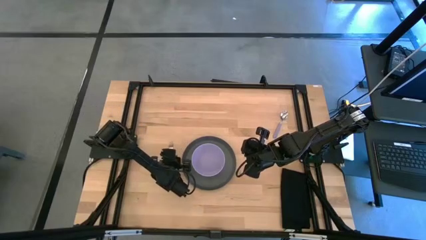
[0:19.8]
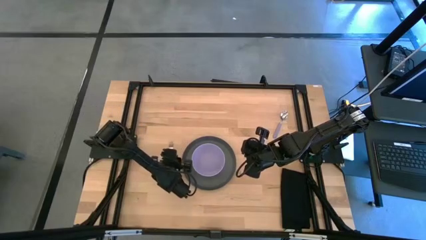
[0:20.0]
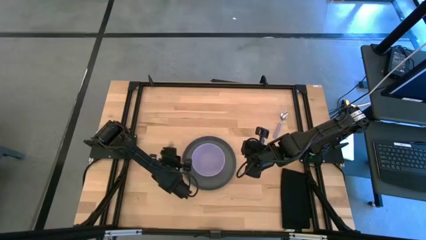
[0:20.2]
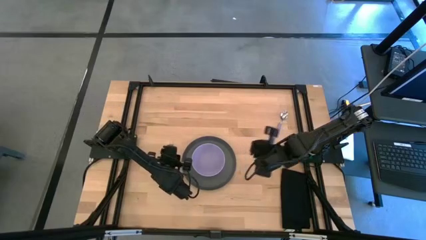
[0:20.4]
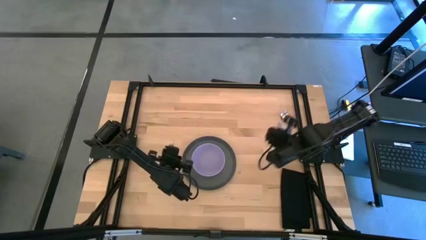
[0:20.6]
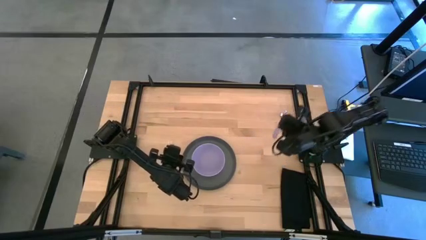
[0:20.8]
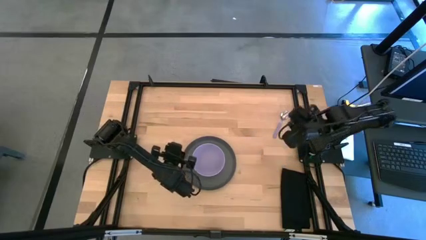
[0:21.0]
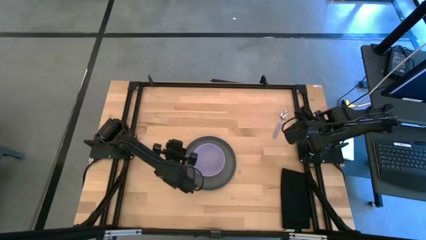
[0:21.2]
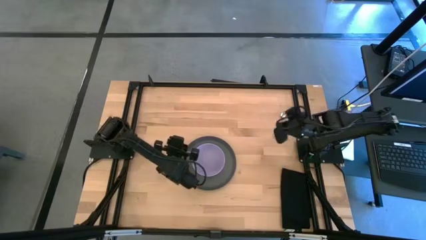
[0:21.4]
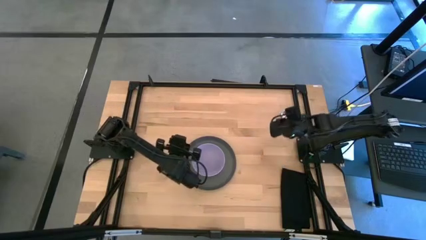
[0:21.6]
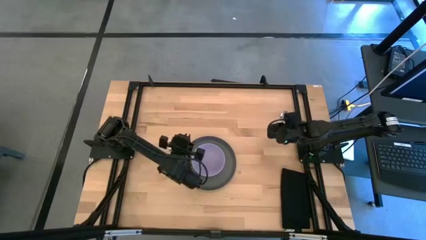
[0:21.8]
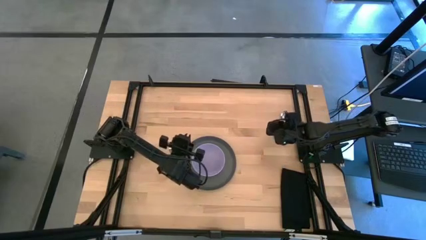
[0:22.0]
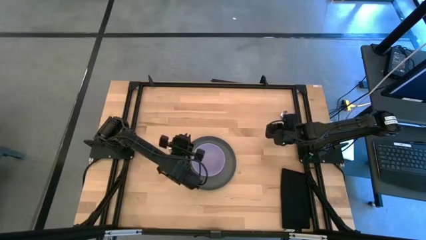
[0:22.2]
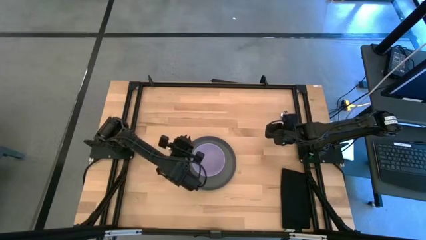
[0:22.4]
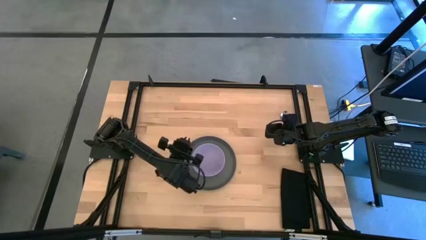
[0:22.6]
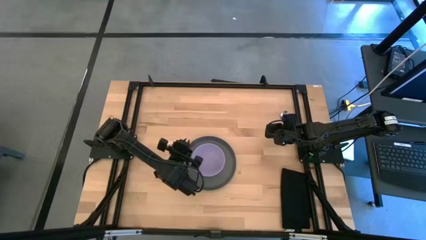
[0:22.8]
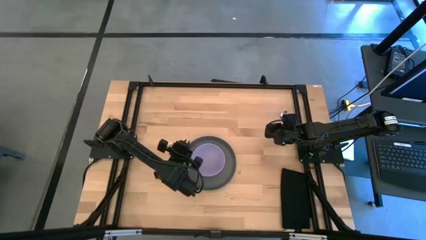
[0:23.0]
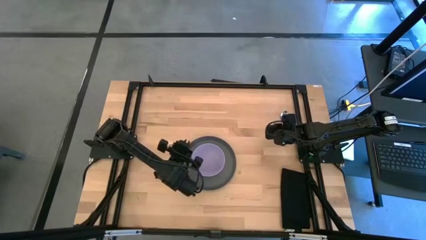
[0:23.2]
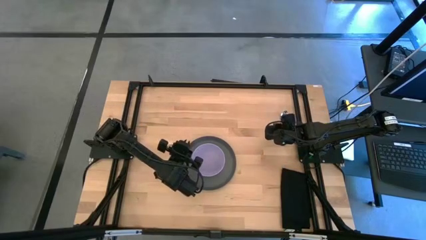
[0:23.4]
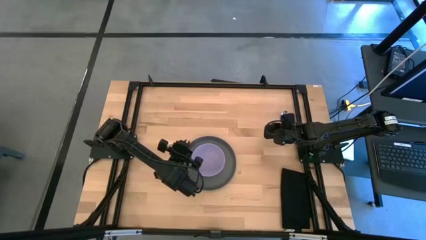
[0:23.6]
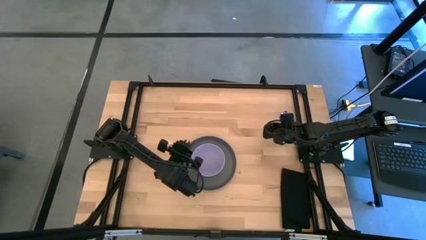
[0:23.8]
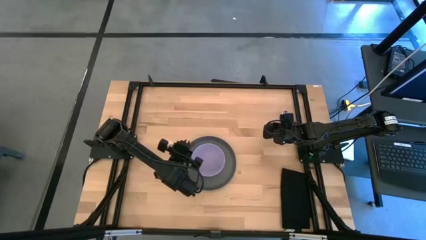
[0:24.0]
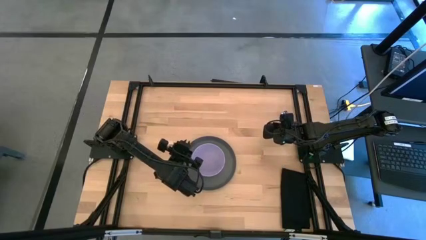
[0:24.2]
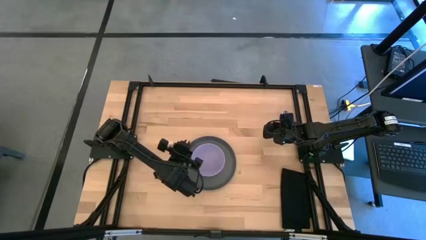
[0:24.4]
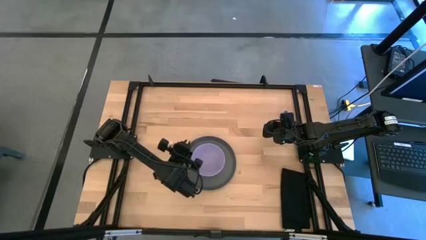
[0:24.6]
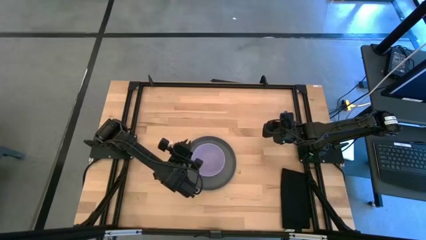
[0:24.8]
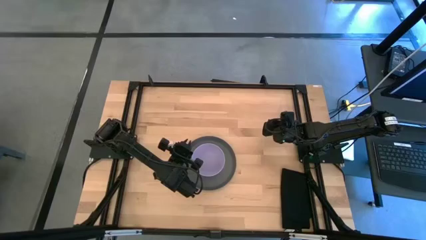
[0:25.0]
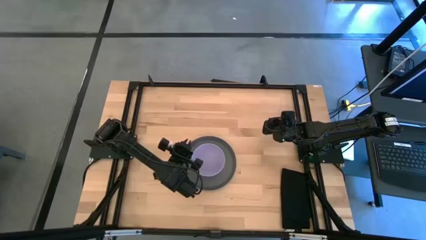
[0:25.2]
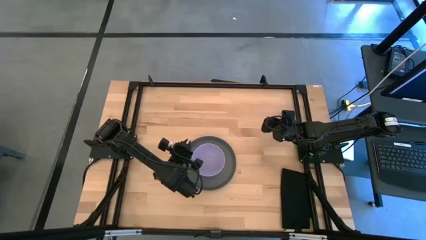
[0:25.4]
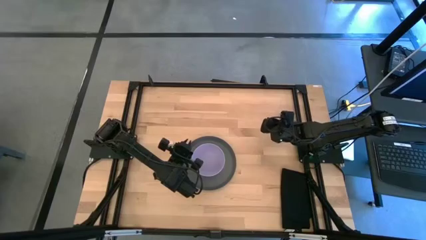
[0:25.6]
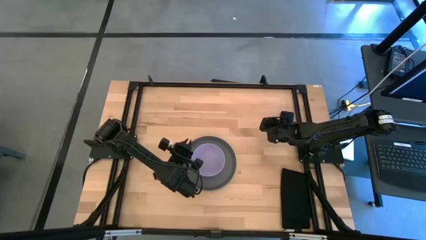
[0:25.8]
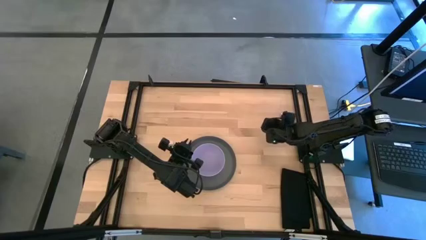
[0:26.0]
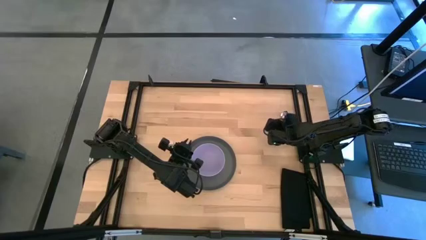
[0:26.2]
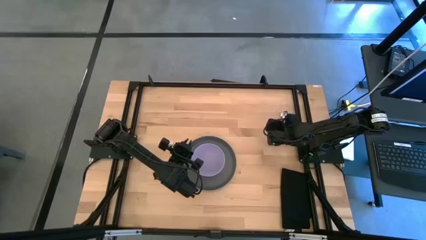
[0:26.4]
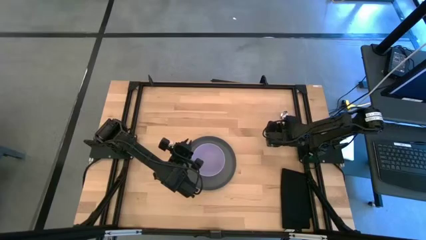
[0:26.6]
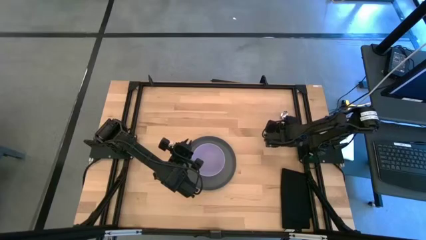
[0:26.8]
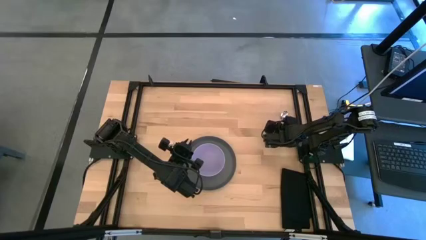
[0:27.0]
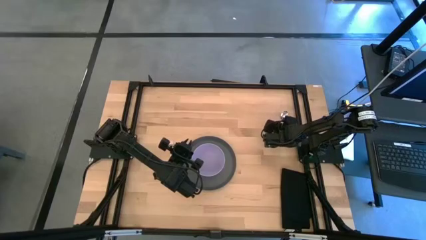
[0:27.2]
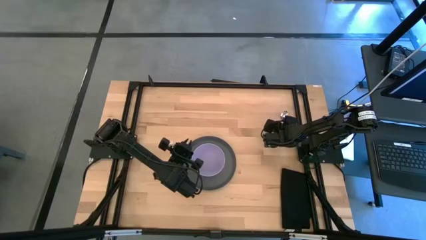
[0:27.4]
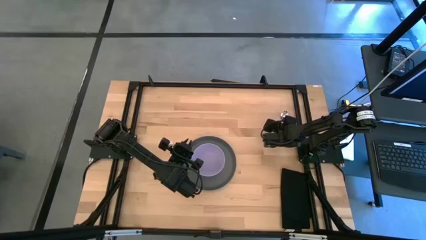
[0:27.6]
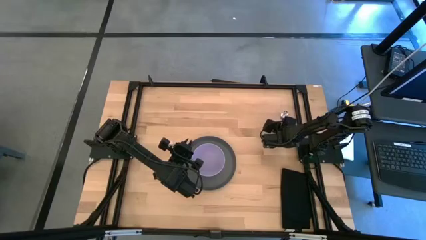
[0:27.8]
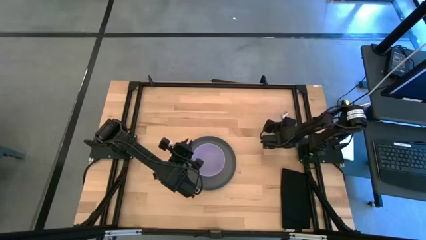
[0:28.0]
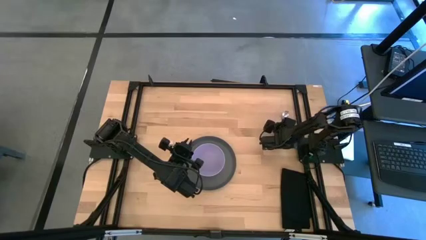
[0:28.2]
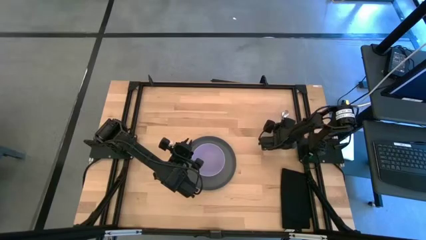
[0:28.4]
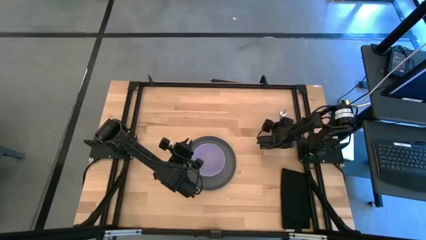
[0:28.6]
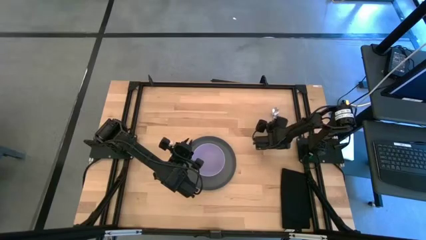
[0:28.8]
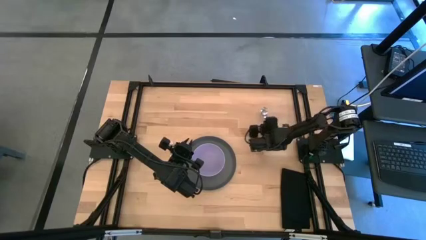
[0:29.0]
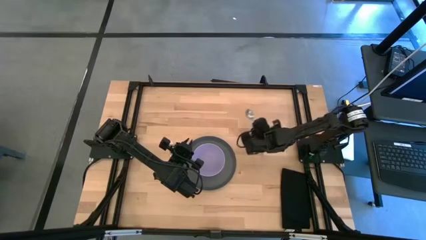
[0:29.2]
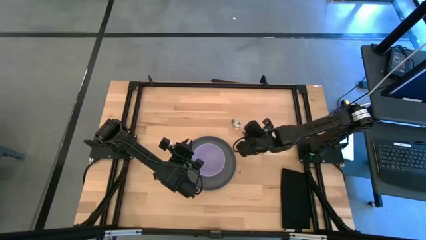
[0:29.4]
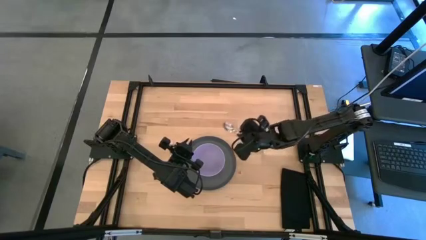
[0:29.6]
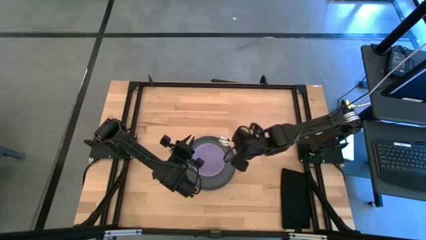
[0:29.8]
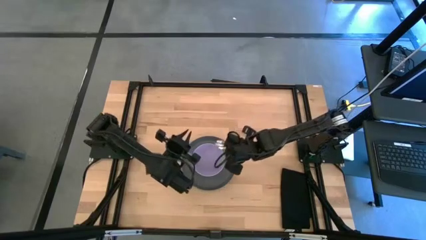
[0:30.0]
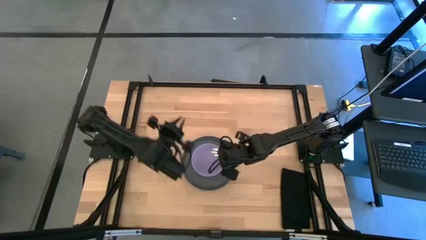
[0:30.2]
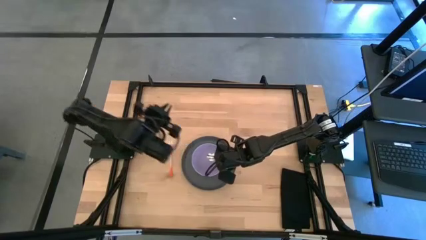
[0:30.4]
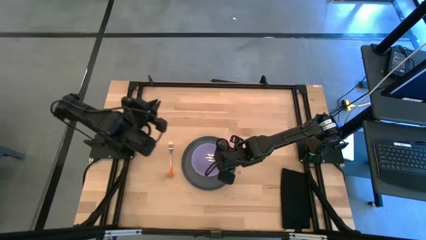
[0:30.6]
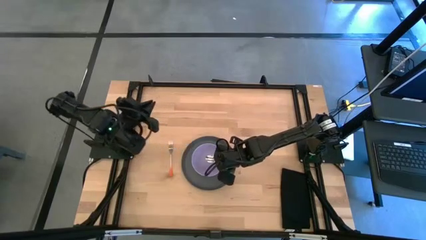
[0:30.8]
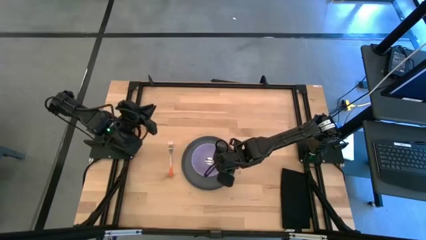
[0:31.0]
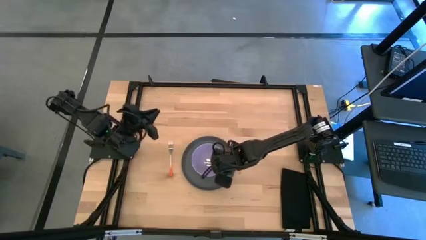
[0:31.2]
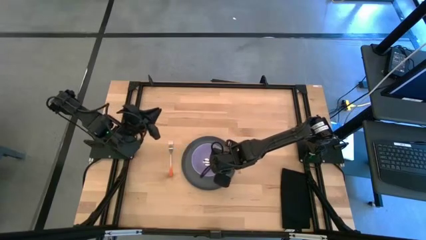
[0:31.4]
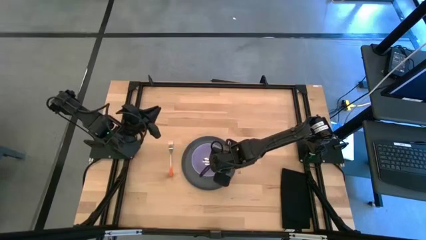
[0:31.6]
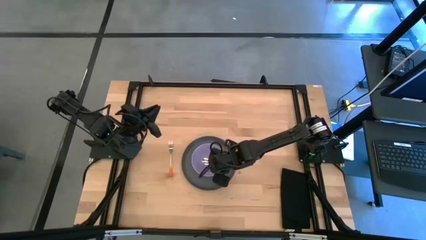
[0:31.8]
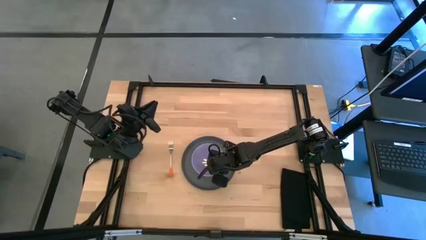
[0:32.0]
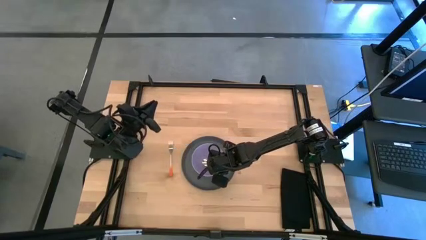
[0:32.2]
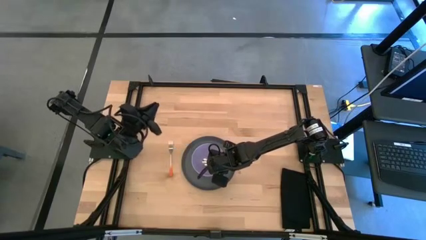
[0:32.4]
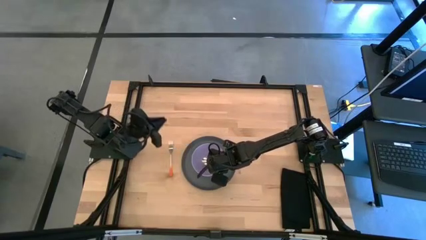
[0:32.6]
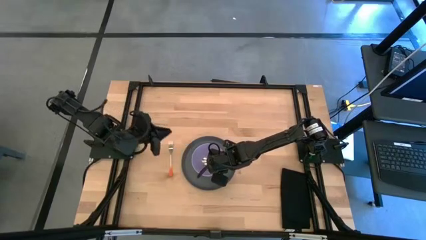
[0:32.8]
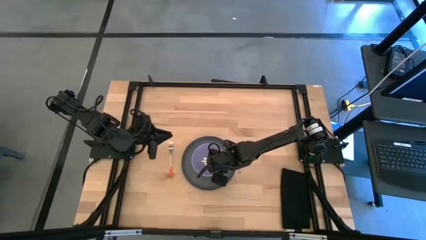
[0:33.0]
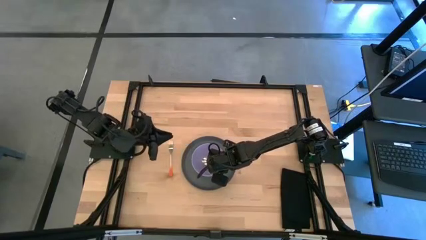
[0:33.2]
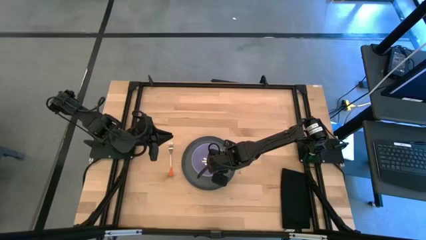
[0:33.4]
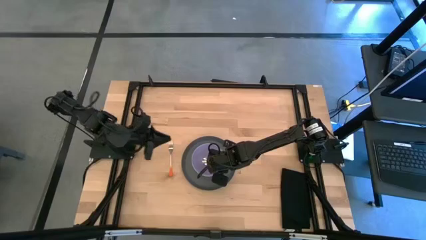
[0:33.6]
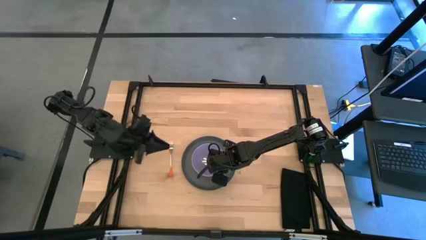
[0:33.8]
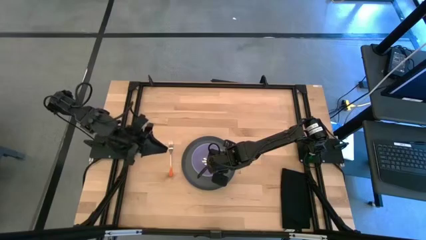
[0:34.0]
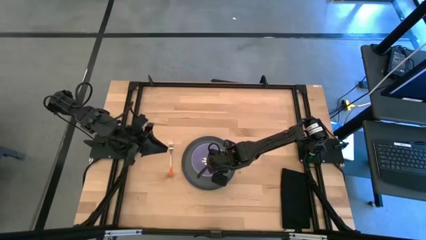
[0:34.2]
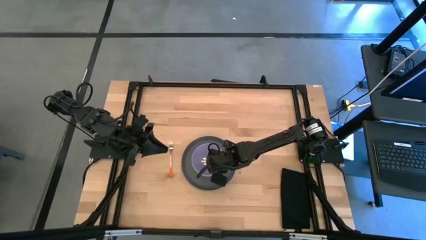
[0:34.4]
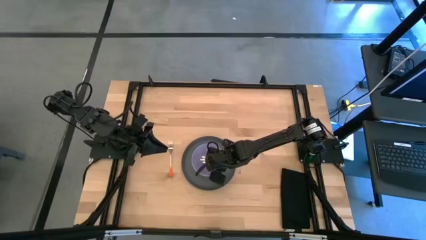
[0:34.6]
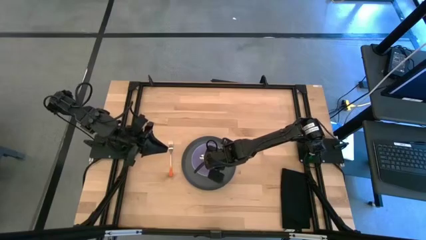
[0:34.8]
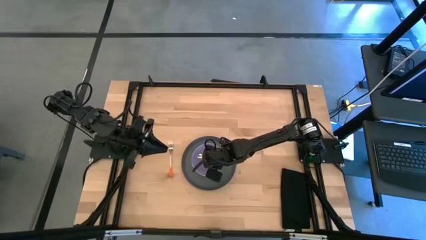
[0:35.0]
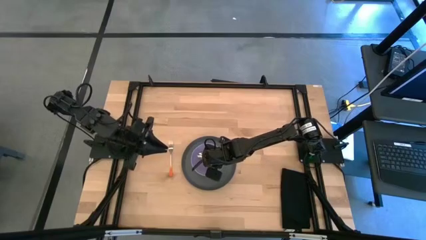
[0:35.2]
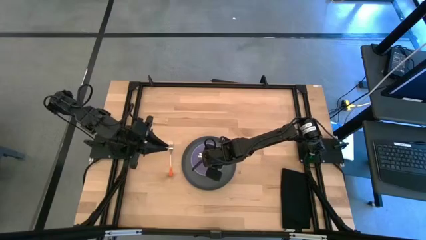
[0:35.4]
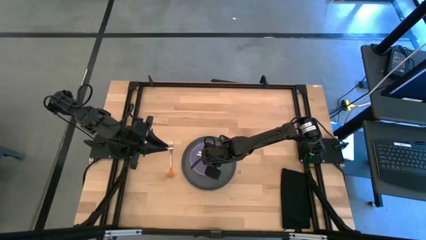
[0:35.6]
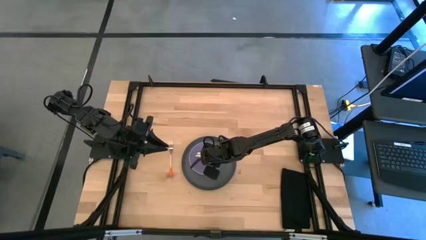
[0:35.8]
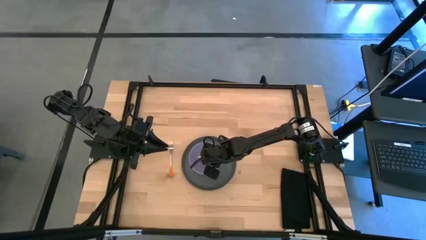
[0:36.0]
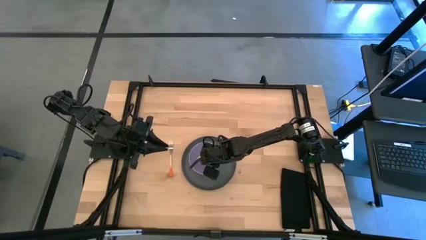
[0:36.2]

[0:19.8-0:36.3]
Task: Set table place
Put the light blue spoon into the light blue bowl
